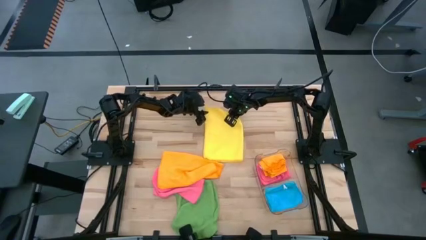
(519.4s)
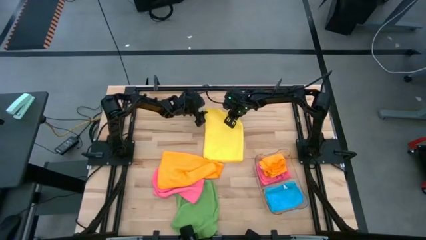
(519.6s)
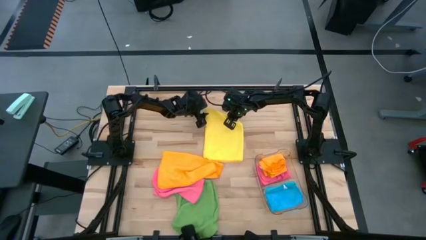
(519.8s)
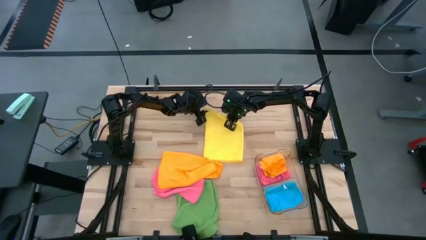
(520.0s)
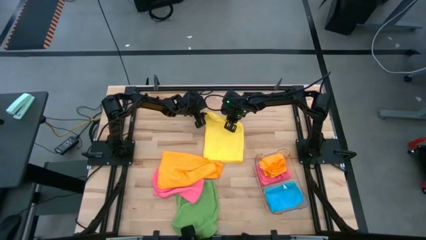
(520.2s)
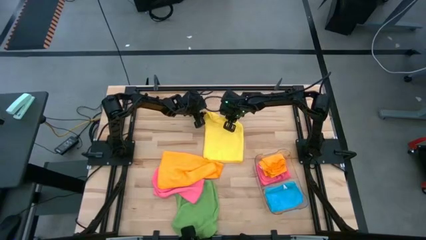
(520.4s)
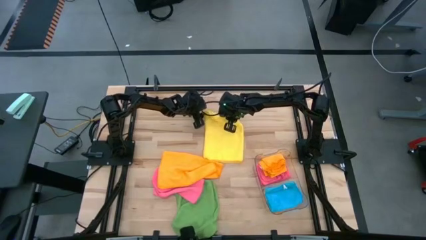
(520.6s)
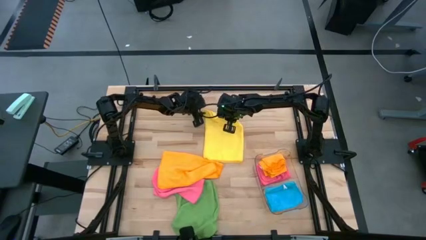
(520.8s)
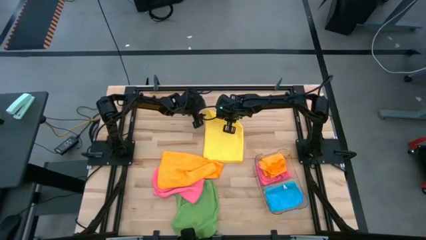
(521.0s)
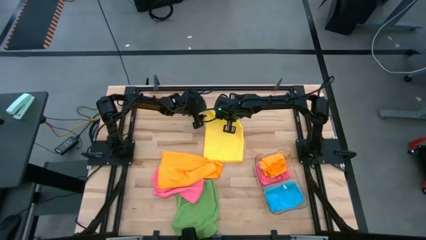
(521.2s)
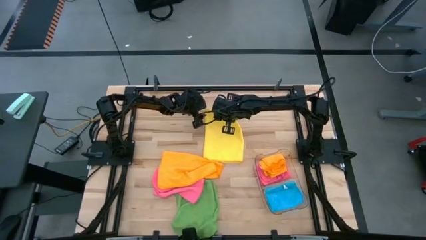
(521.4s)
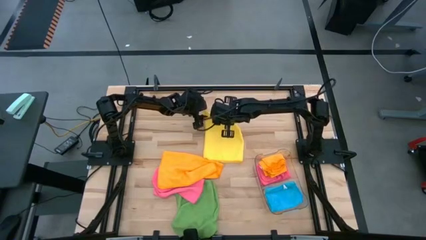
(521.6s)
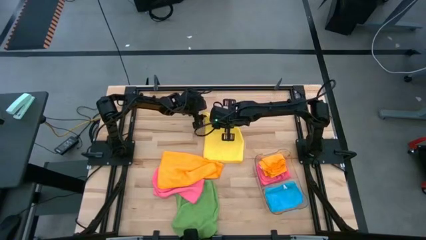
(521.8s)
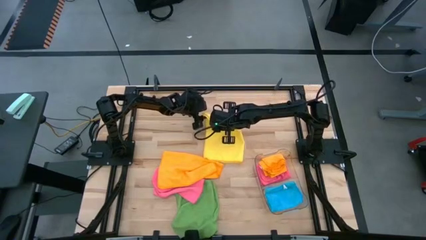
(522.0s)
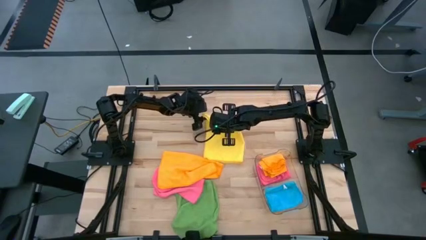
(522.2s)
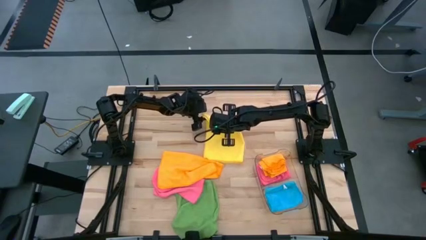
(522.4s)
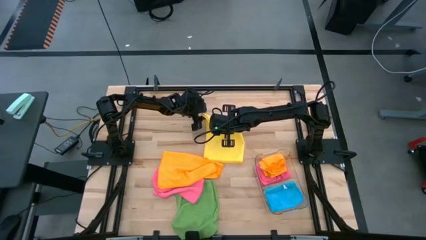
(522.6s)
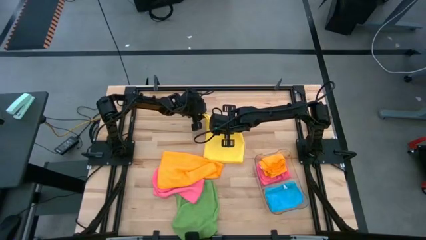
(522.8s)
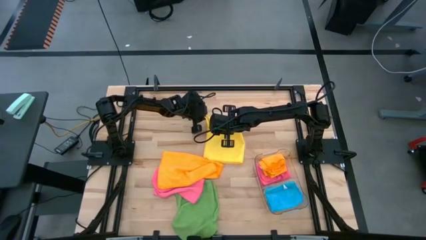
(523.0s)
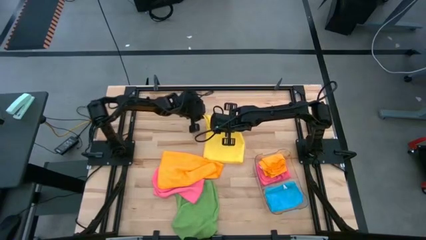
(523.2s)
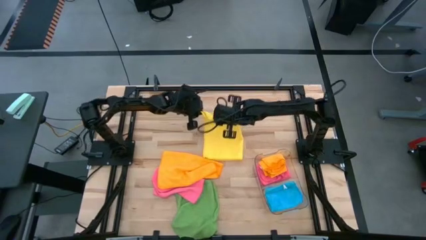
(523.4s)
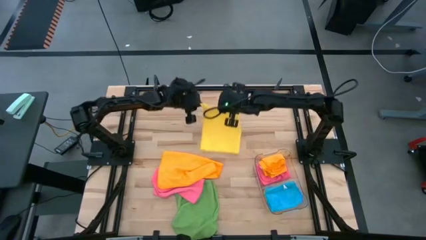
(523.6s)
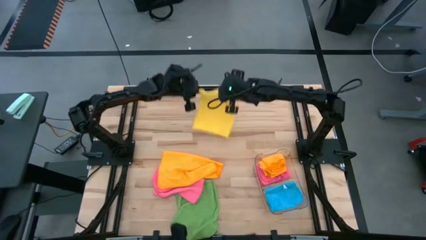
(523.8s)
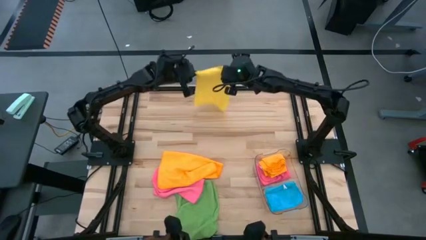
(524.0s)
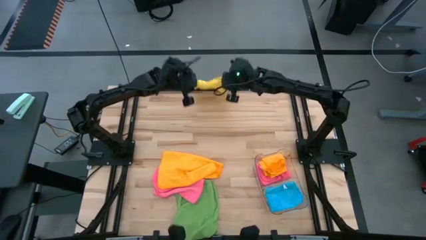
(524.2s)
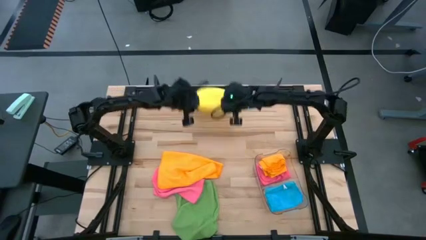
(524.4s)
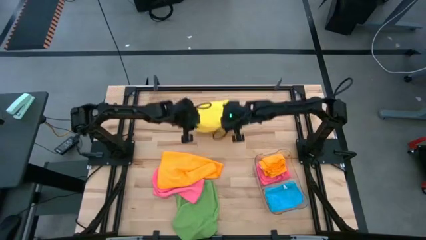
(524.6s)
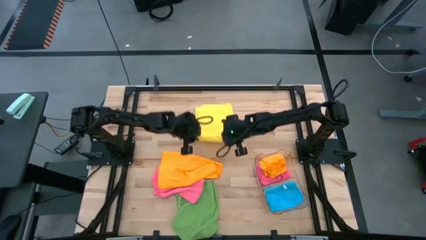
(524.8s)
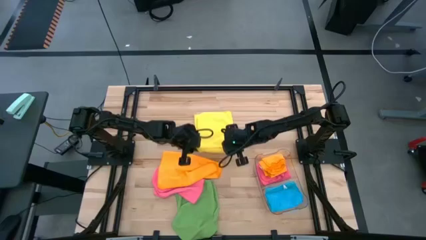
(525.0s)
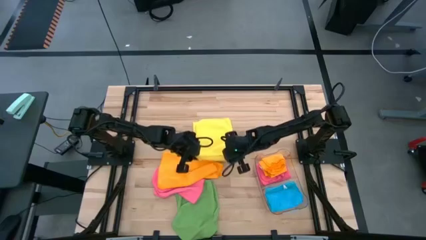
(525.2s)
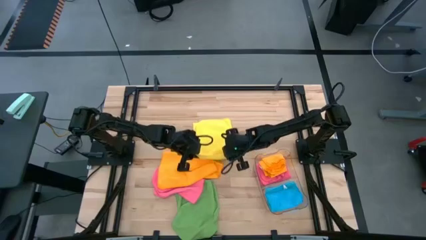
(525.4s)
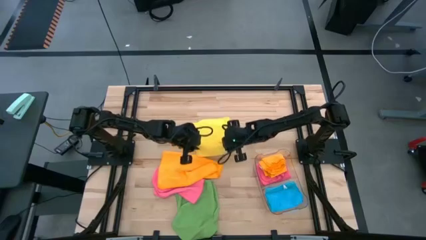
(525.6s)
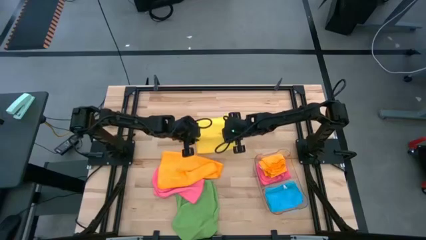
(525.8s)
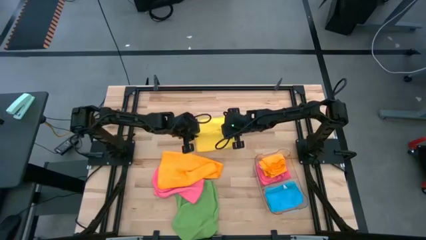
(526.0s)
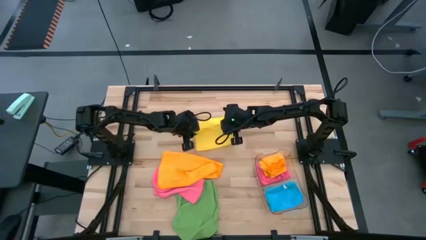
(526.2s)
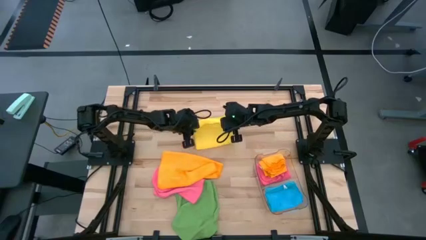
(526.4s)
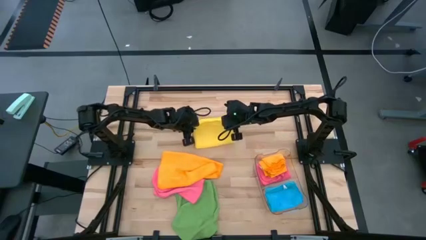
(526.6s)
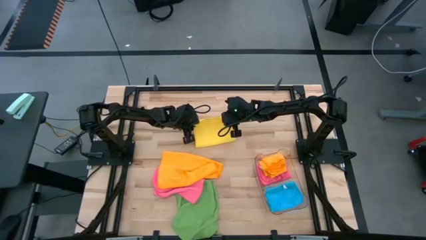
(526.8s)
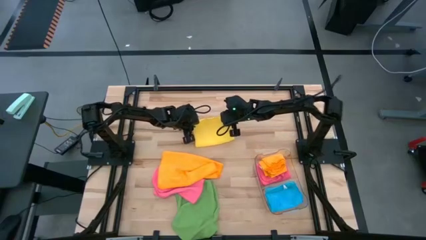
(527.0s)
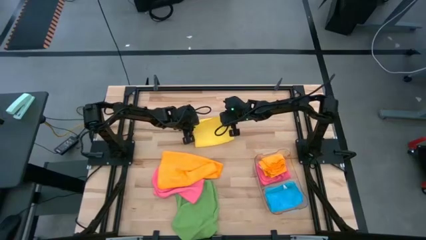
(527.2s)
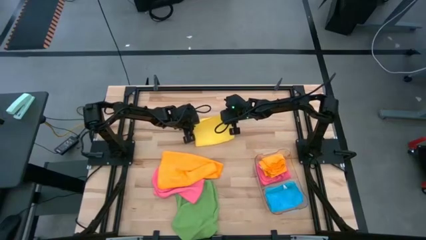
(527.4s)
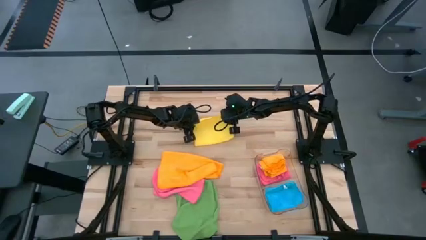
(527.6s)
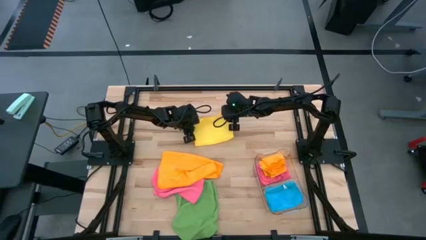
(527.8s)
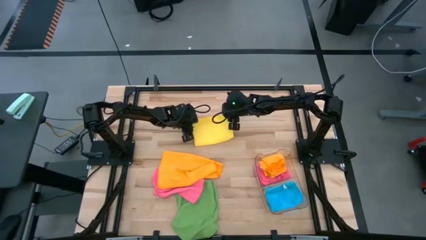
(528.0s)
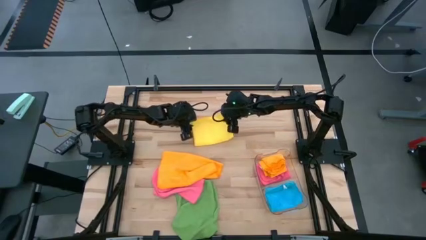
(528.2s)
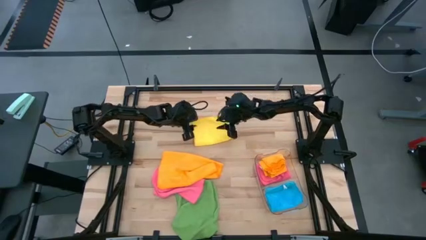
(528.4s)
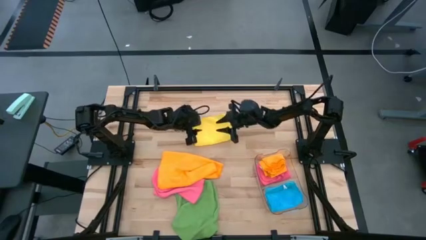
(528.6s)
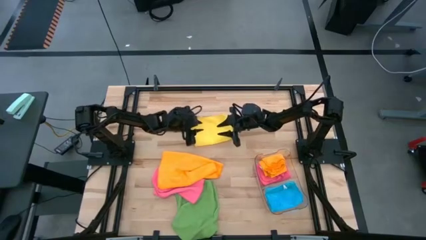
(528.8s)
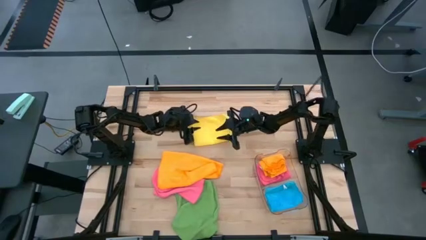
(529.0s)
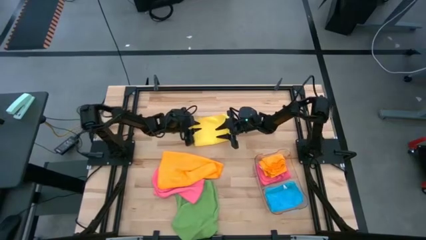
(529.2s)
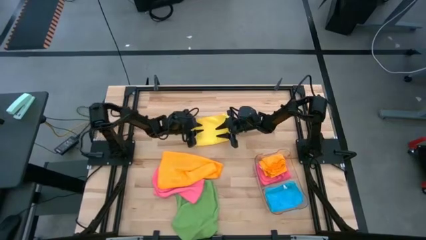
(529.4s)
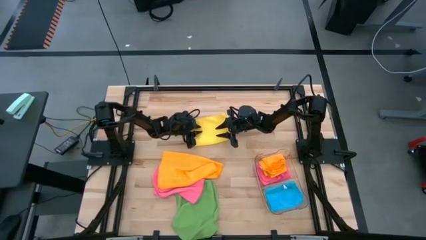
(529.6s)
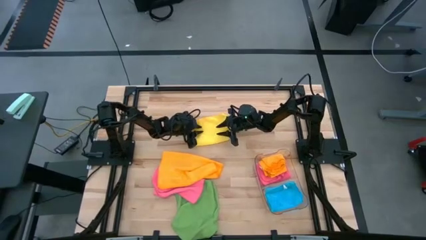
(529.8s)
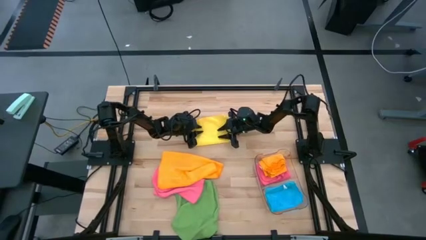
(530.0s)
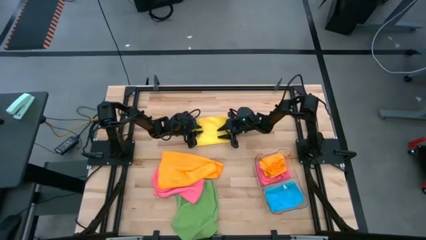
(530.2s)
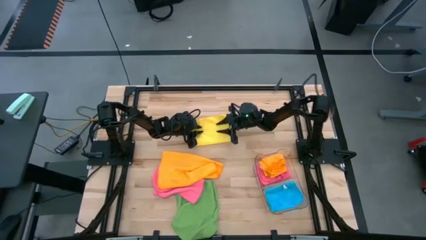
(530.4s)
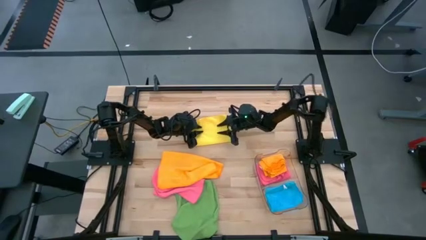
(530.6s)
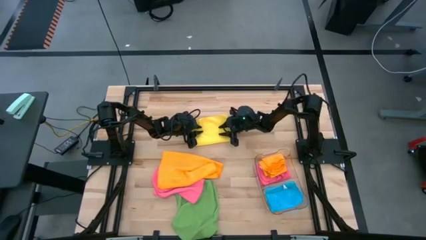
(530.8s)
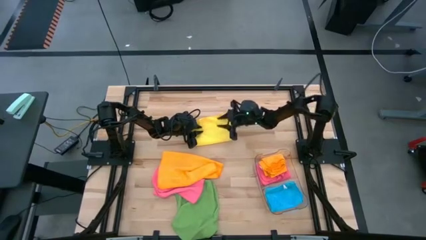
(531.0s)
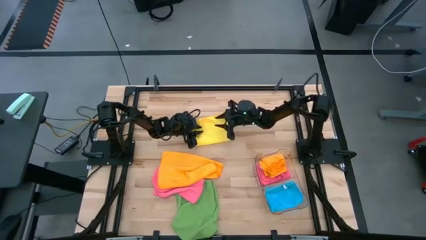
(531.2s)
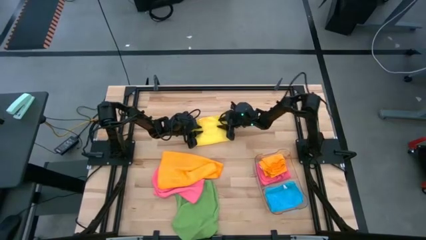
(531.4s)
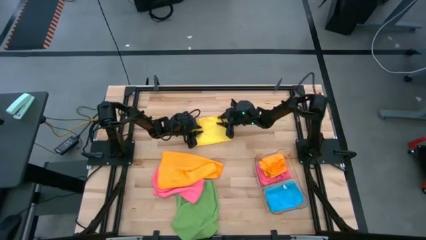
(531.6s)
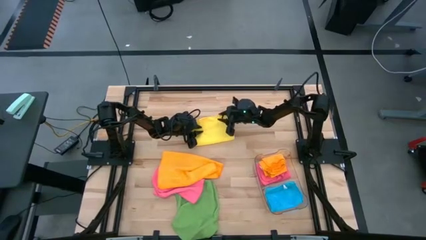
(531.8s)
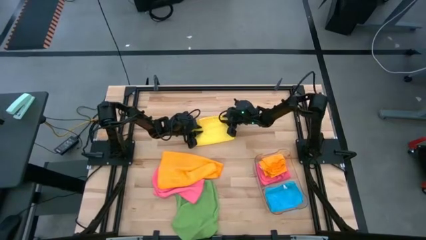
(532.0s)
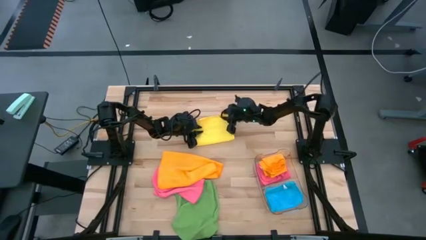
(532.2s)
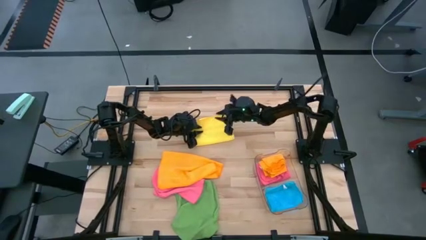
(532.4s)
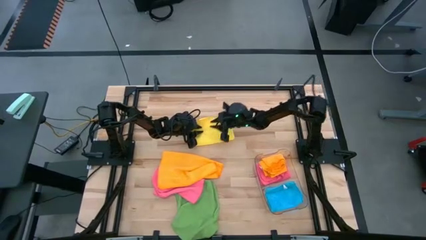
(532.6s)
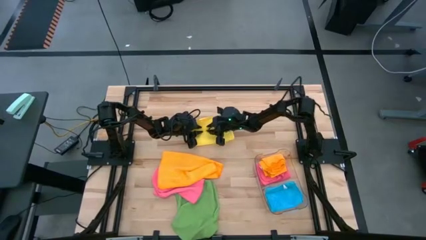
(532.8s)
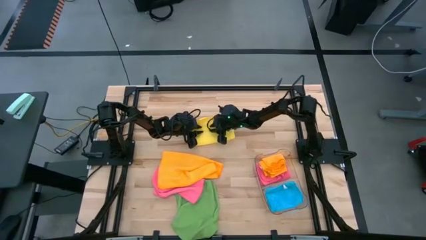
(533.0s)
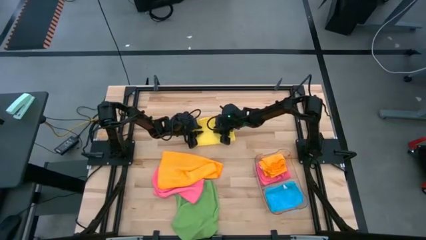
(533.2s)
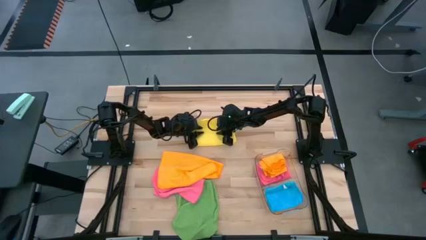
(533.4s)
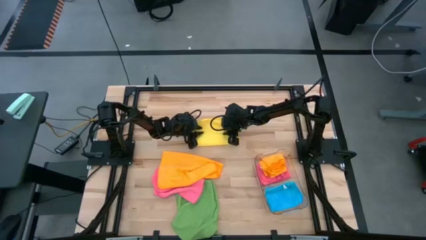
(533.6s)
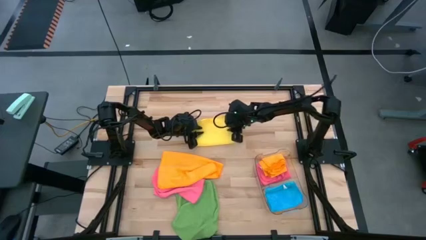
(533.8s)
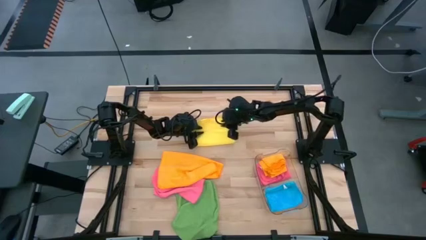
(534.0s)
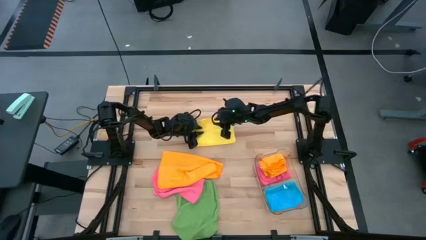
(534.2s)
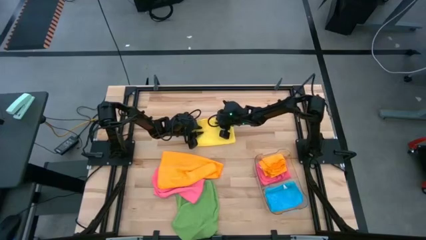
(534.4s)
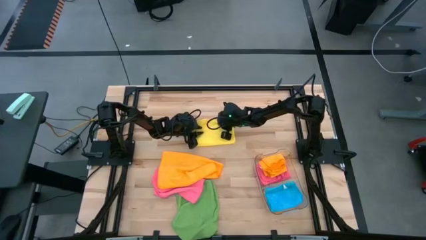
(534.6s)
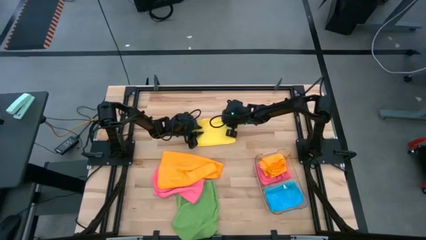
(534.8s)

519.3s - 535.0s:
Task: Fold microfiber towels
Fold the yellow towel
